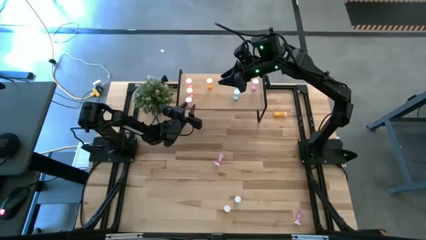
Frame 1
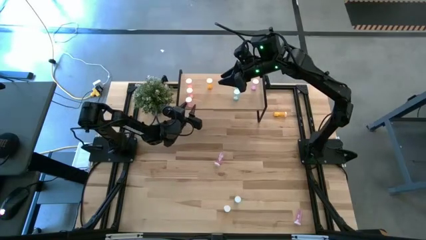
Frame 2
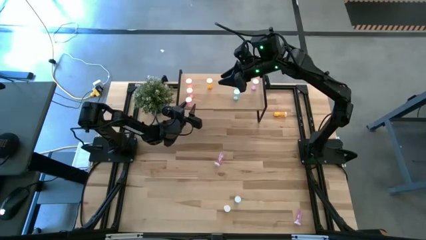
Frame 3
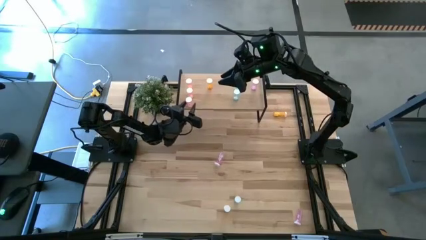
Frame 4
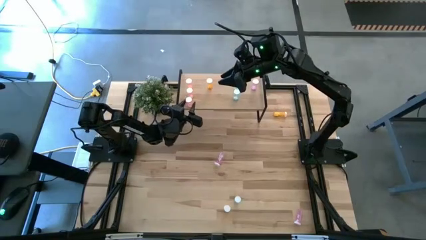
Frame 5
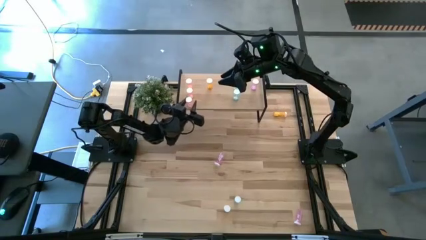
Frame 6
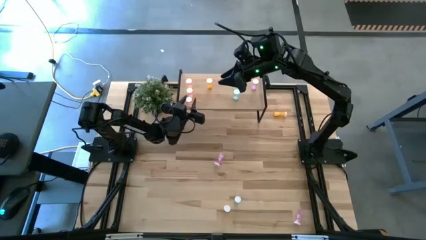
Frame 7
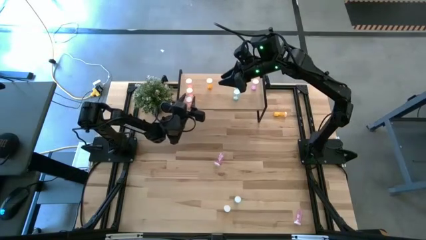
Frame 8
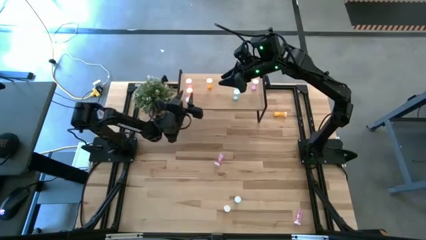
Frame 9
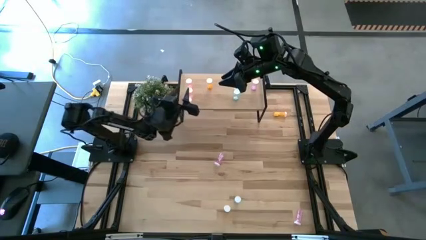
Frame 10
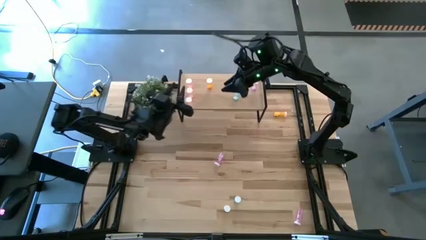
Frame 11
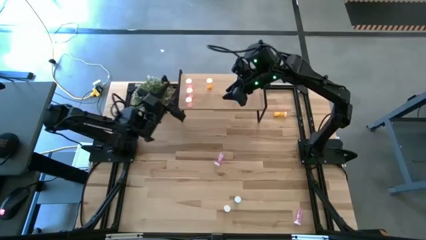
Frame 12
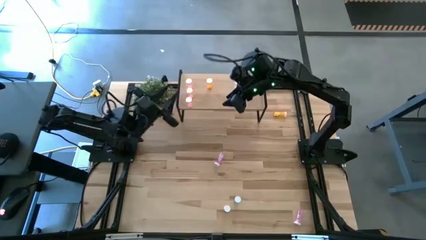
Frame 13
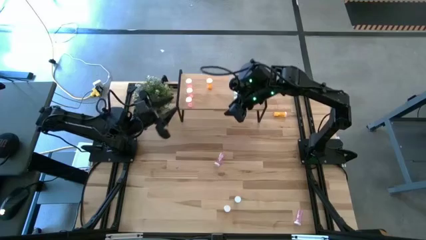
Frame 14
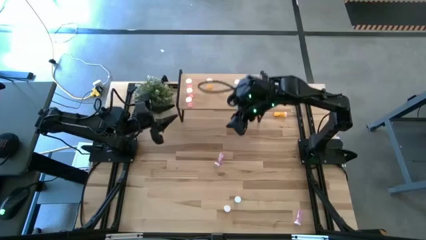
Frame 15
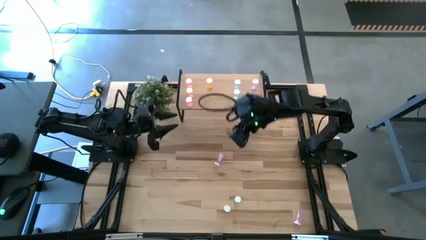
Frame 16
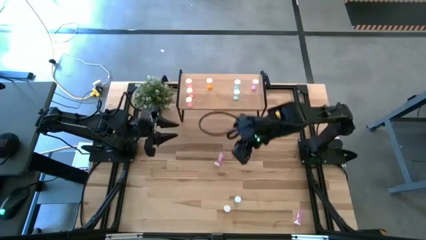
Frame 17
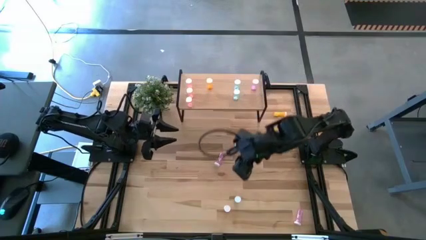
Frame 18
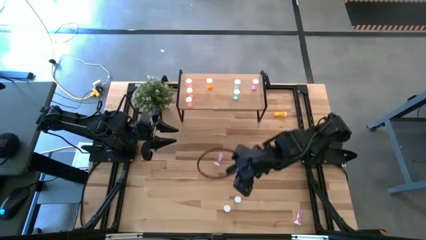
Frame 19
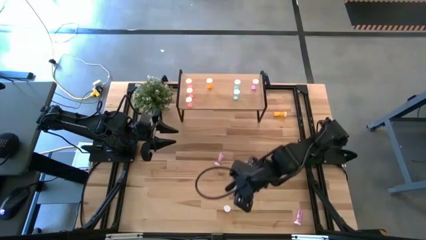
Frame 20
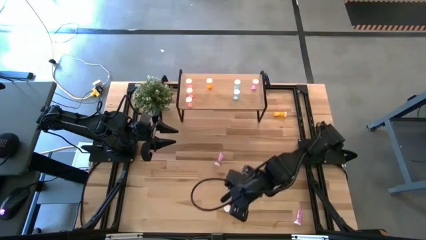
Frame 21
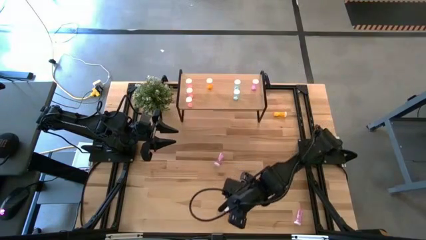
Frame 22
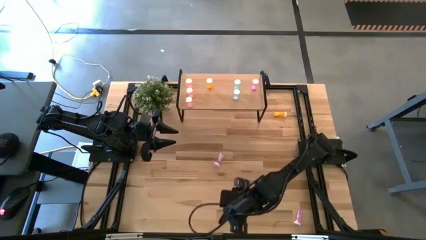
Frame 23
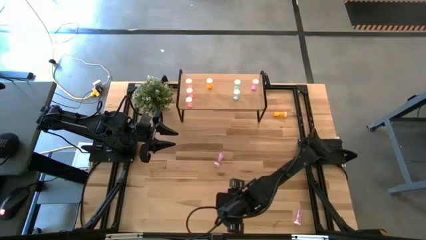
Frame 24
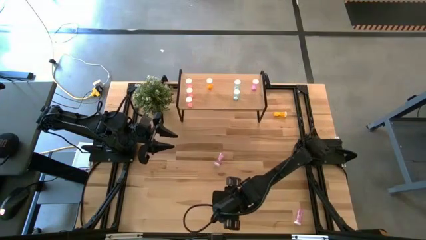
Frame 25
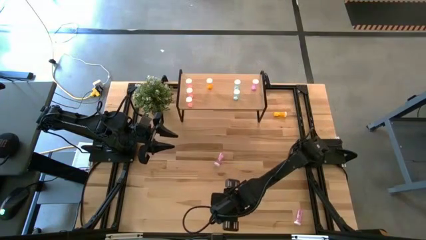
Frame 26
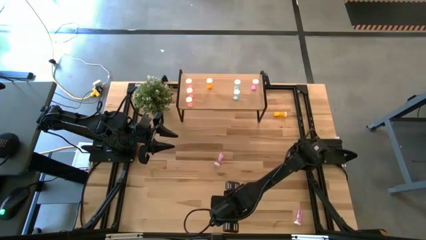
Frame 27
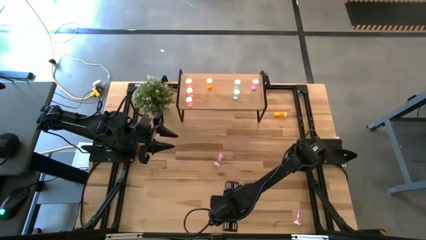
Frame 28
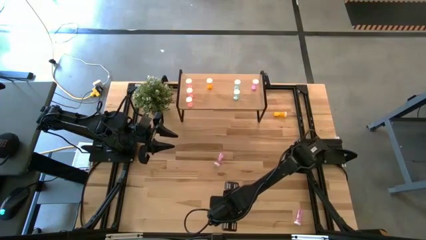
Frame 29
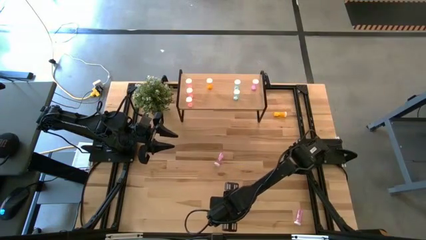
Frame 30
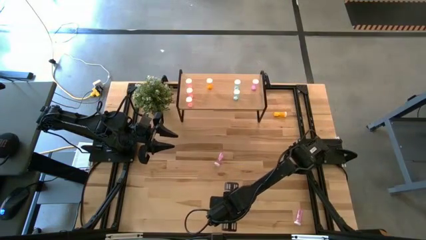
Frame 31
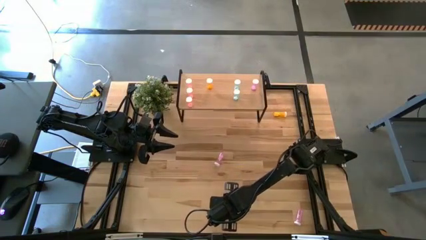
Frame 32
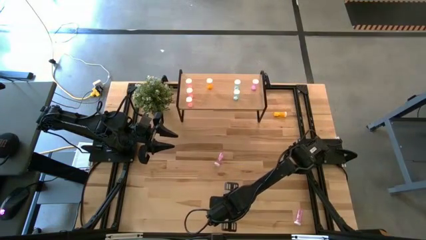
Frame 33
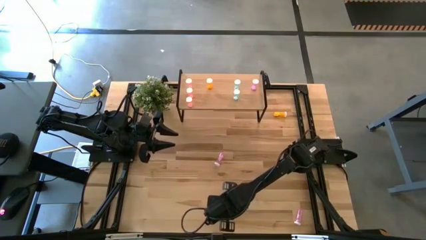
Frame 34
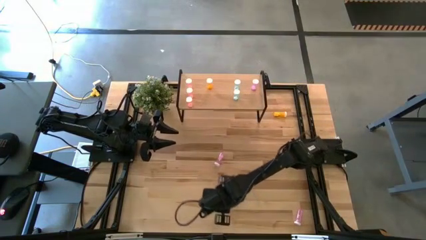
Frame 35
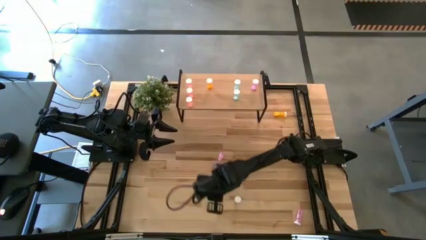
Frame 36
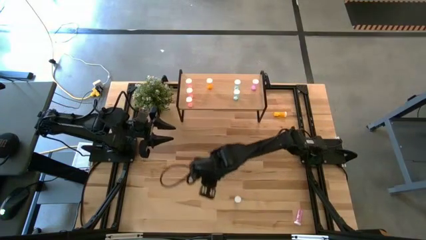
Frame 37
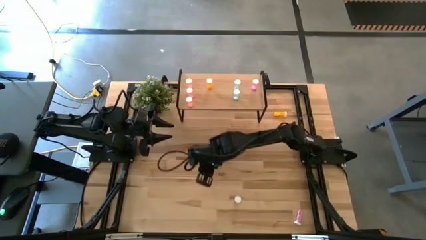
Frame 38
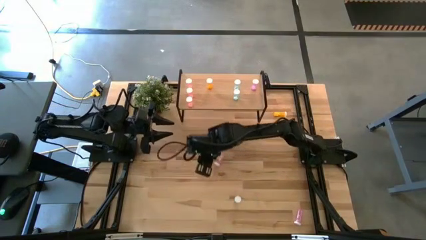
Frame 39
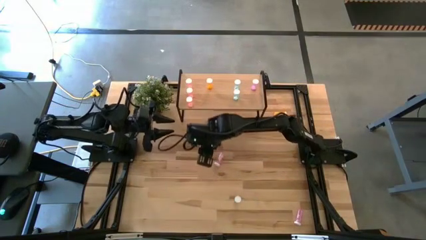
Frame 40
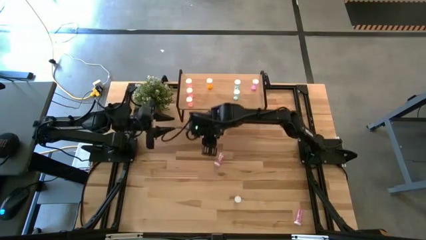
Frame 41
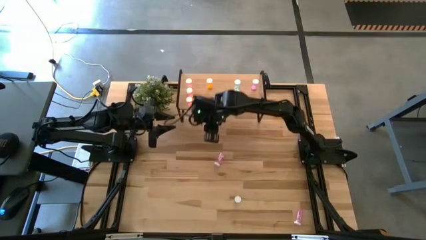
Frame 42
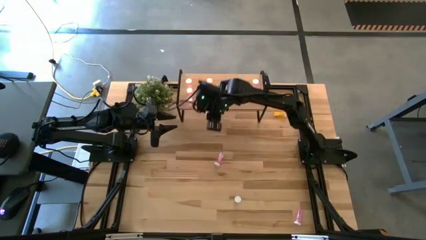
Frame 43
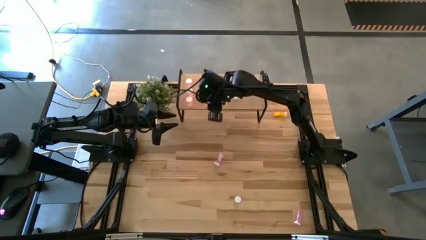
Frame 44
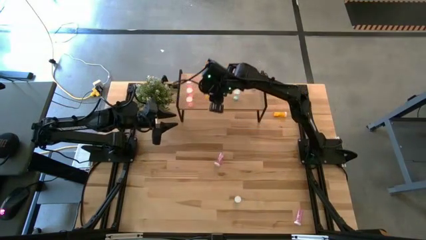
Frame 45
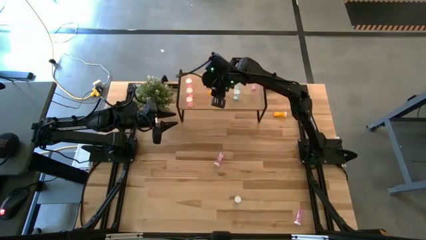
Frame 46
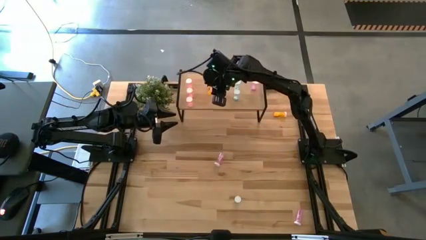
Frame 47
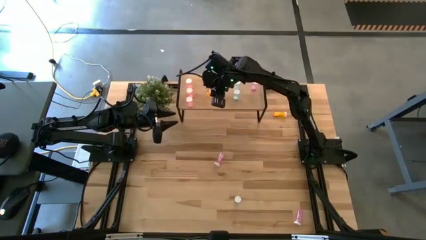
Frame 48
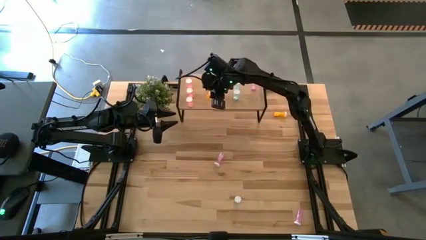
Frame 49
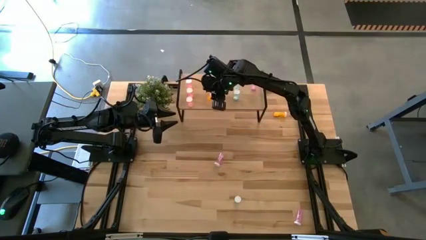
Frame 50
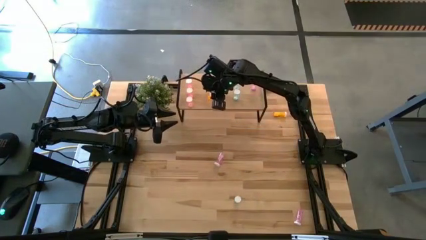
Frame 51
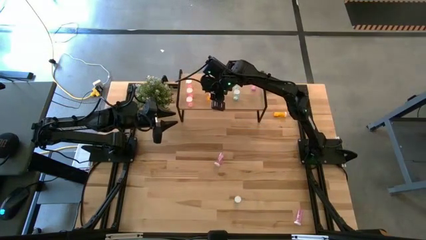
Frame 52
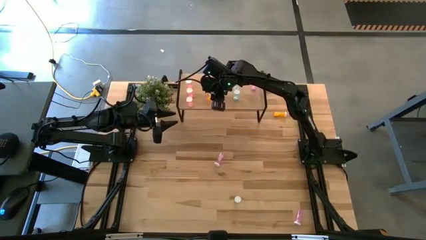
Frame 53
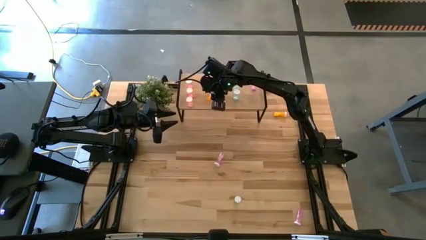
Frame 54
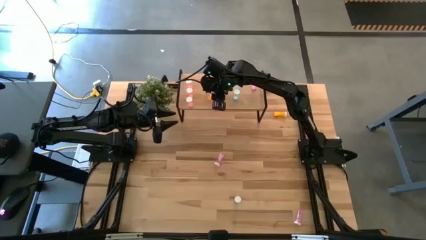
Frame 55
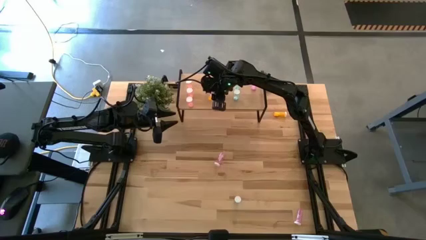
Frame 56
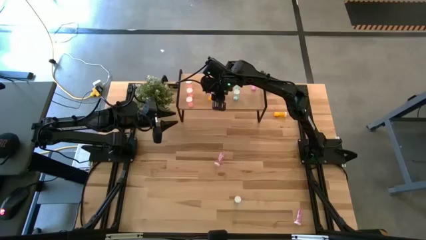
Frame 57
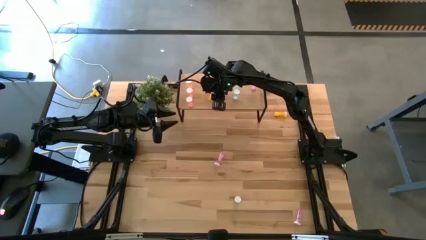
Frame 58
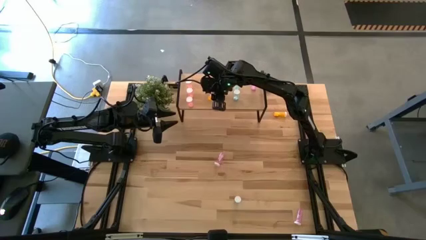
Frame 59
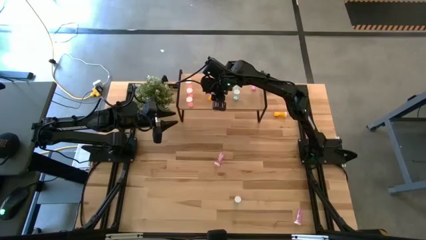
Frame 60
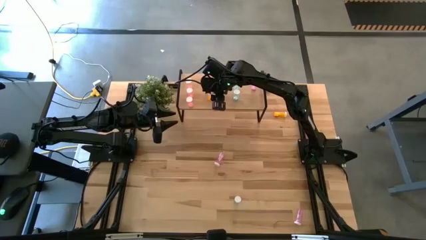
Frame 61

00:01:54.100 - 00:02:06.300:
Task: Pick and place medicine bottles onto shelf by color
Put the bottom orange pill bottle on the shelf aligned with the other orange pill bottle
